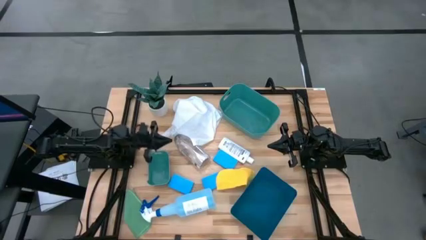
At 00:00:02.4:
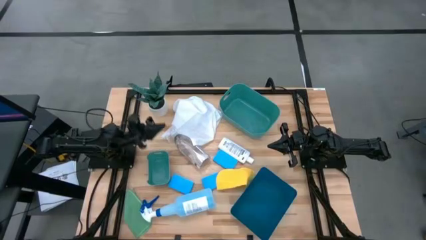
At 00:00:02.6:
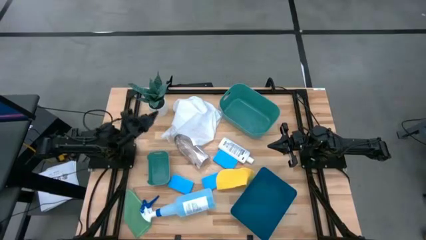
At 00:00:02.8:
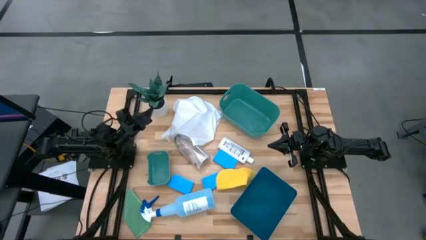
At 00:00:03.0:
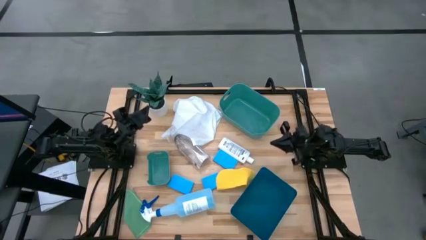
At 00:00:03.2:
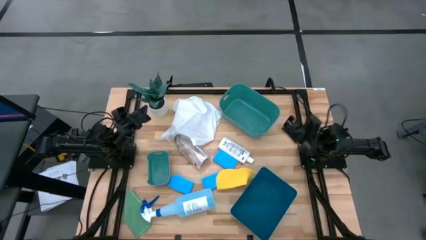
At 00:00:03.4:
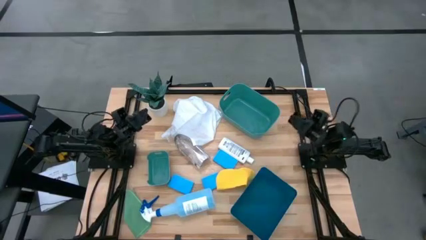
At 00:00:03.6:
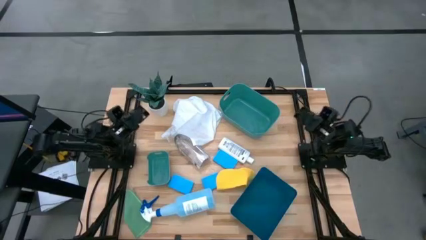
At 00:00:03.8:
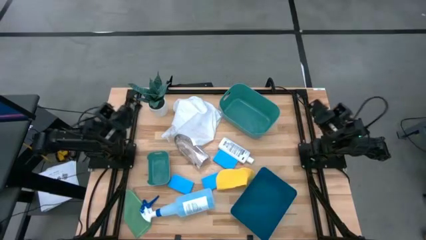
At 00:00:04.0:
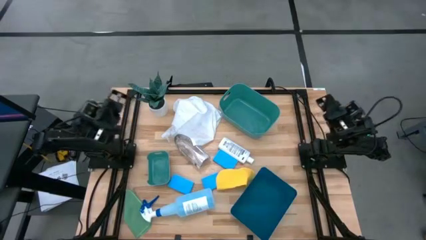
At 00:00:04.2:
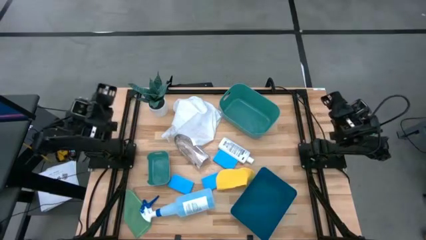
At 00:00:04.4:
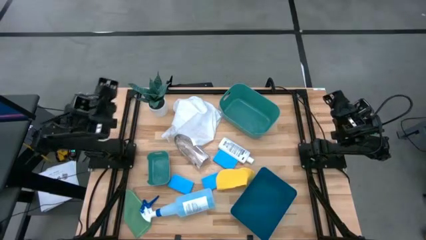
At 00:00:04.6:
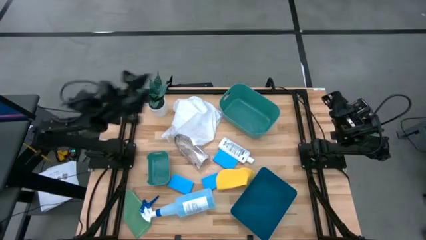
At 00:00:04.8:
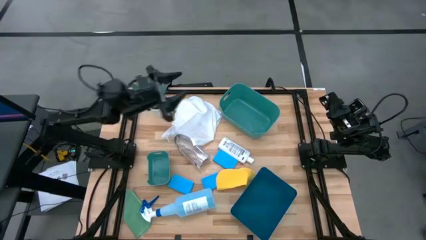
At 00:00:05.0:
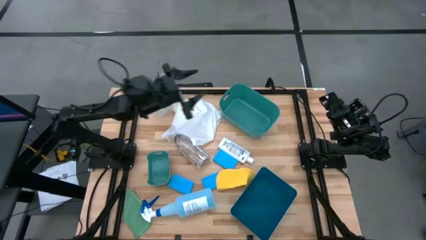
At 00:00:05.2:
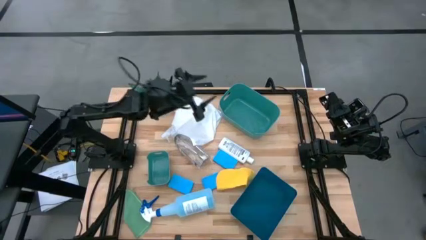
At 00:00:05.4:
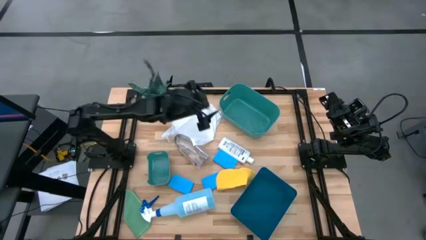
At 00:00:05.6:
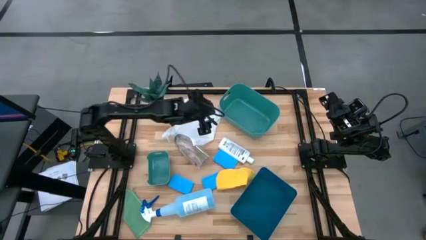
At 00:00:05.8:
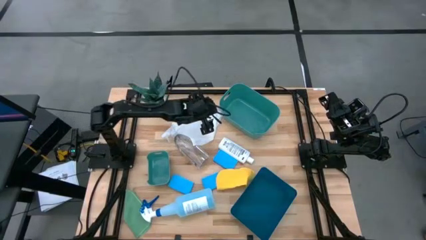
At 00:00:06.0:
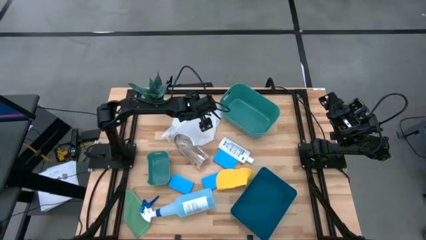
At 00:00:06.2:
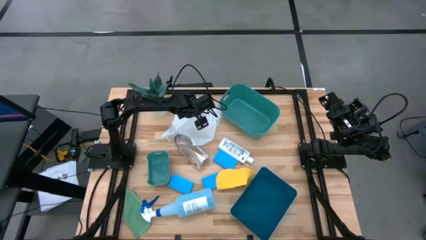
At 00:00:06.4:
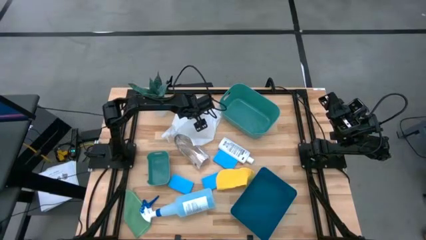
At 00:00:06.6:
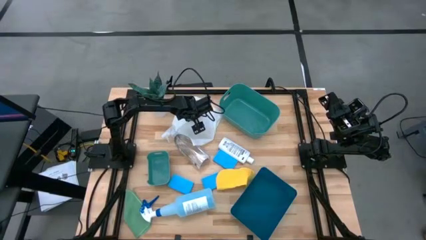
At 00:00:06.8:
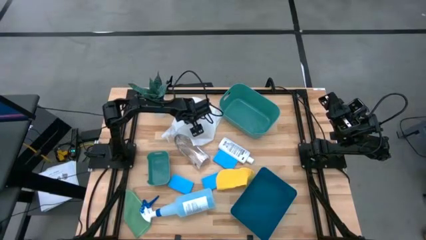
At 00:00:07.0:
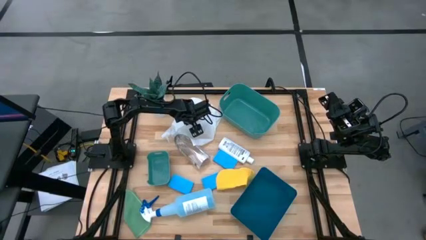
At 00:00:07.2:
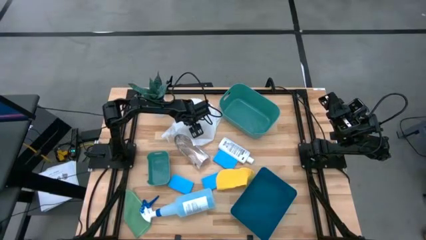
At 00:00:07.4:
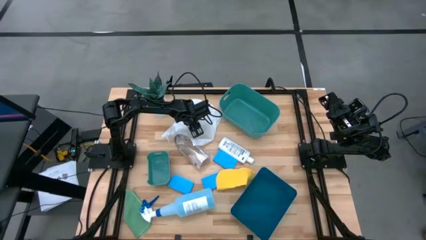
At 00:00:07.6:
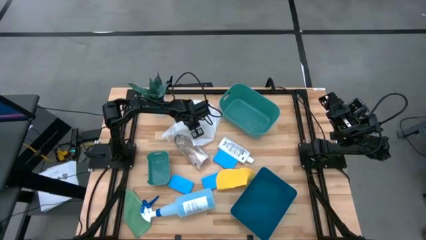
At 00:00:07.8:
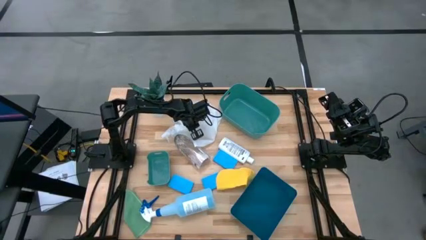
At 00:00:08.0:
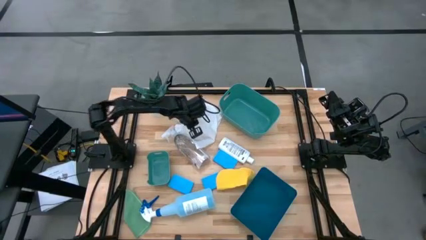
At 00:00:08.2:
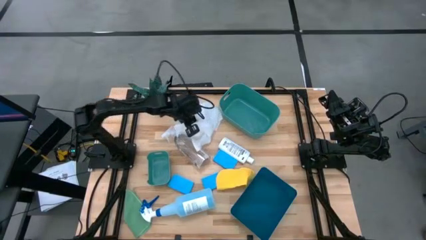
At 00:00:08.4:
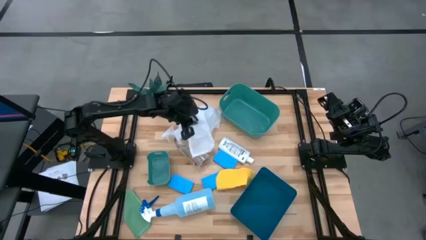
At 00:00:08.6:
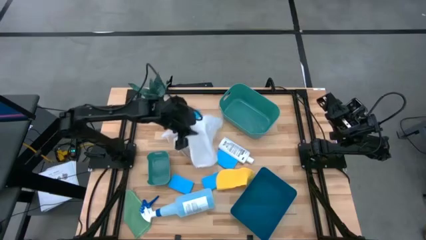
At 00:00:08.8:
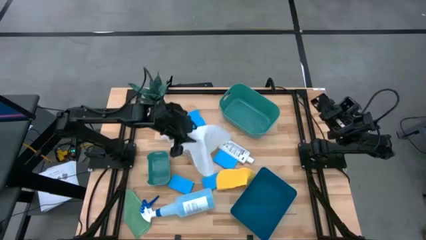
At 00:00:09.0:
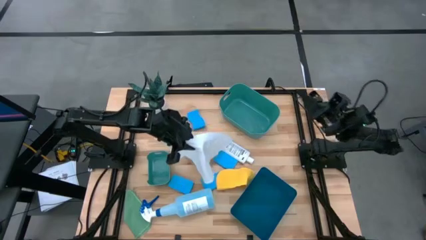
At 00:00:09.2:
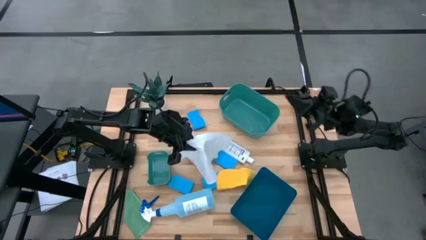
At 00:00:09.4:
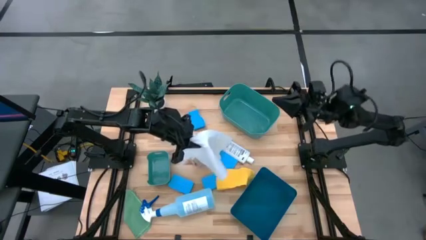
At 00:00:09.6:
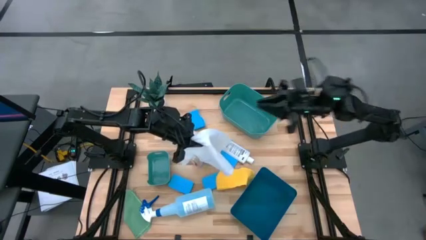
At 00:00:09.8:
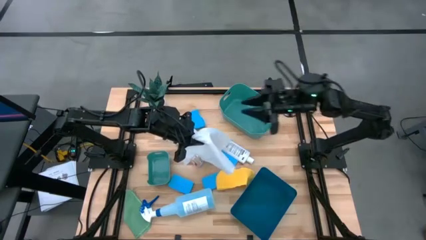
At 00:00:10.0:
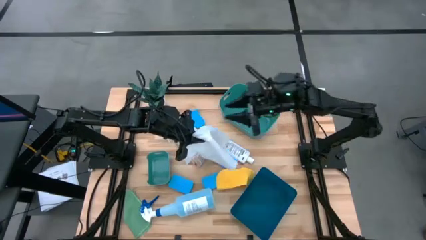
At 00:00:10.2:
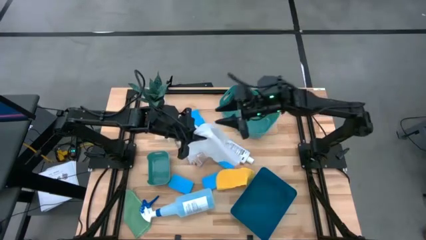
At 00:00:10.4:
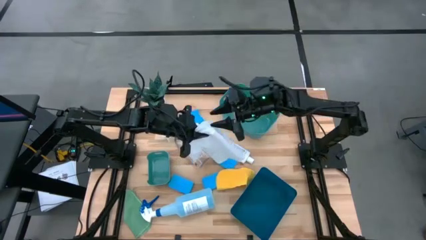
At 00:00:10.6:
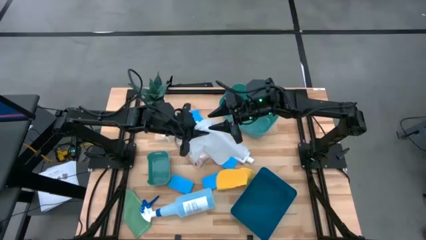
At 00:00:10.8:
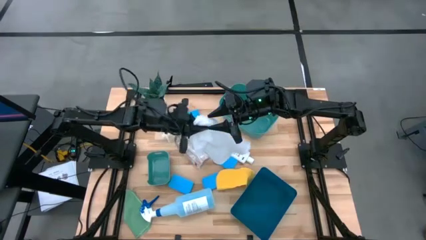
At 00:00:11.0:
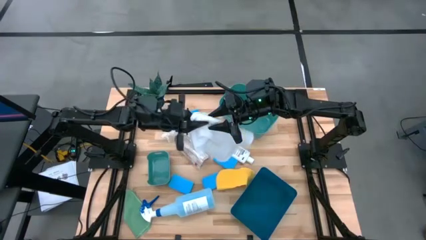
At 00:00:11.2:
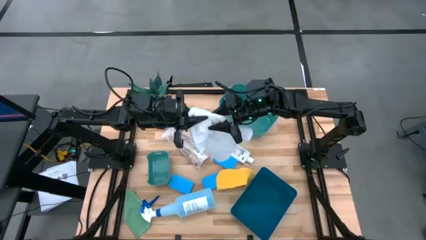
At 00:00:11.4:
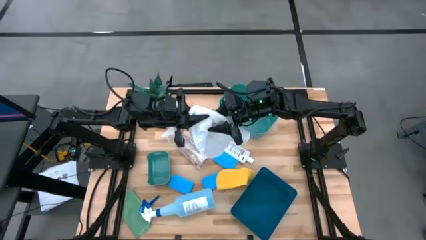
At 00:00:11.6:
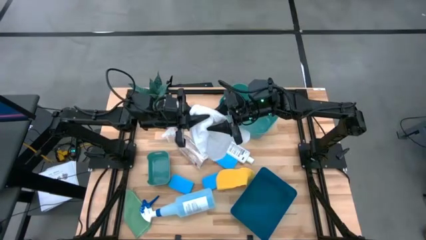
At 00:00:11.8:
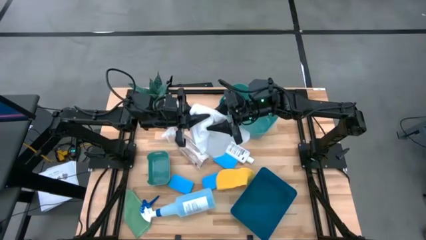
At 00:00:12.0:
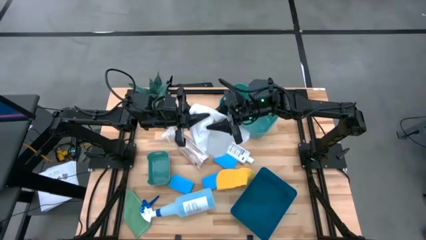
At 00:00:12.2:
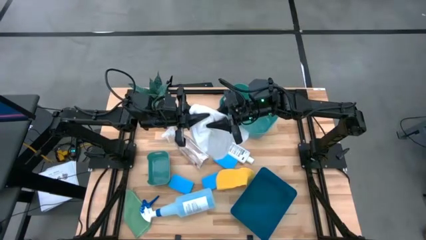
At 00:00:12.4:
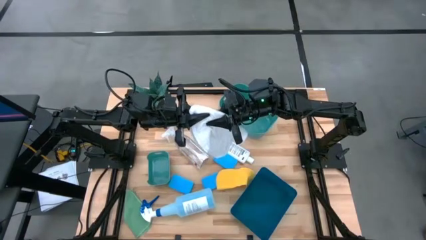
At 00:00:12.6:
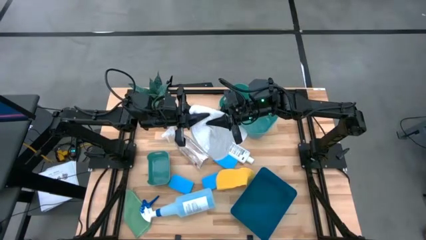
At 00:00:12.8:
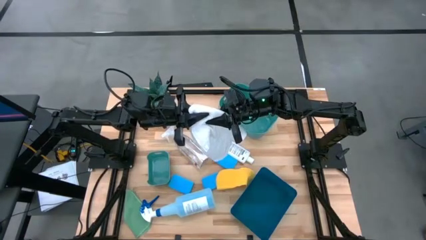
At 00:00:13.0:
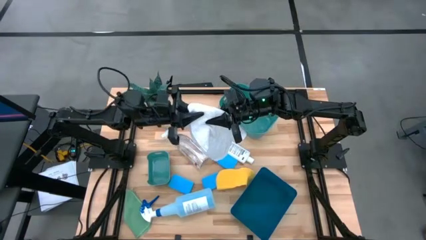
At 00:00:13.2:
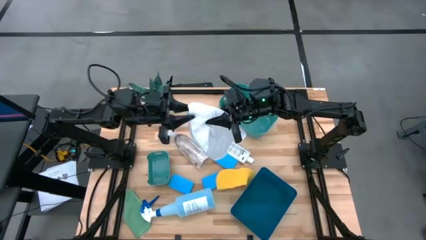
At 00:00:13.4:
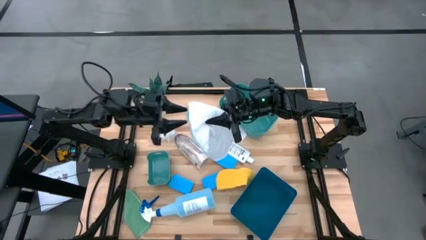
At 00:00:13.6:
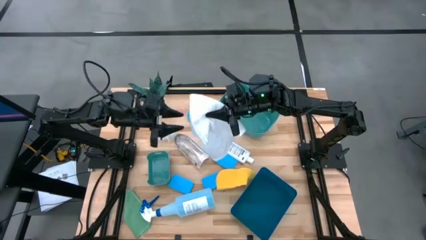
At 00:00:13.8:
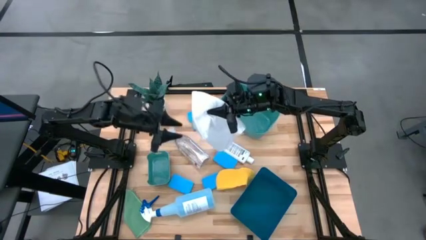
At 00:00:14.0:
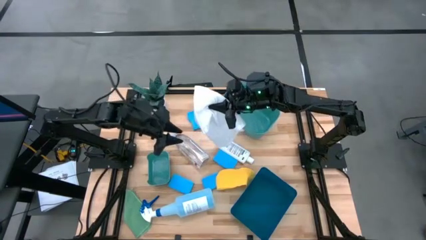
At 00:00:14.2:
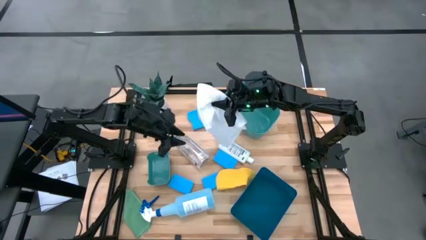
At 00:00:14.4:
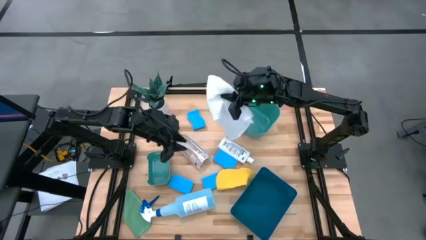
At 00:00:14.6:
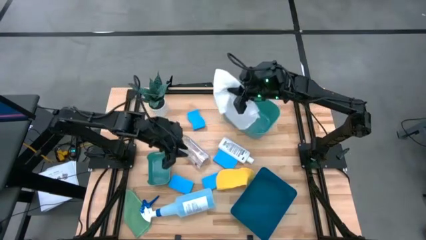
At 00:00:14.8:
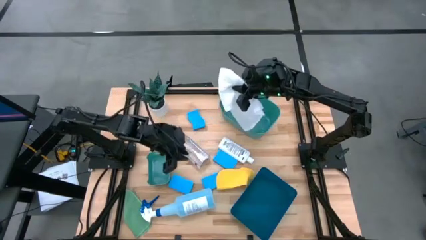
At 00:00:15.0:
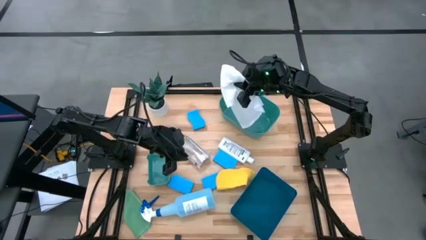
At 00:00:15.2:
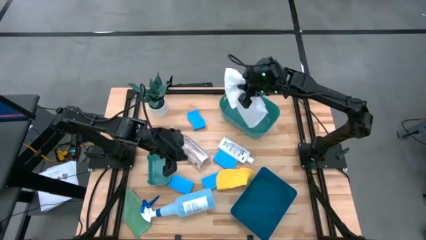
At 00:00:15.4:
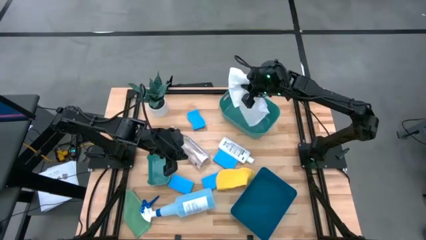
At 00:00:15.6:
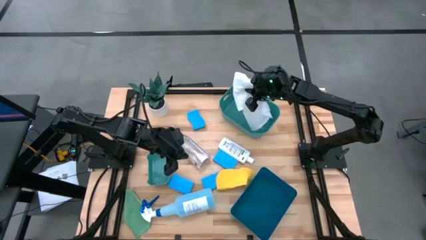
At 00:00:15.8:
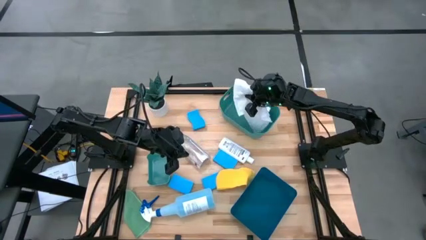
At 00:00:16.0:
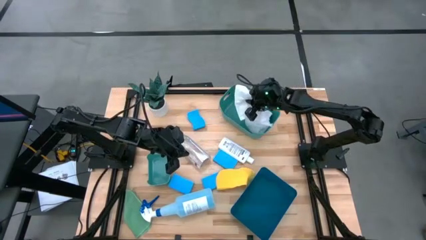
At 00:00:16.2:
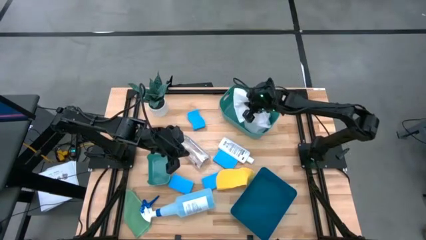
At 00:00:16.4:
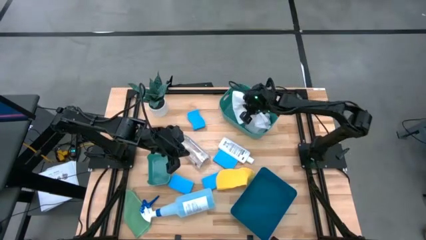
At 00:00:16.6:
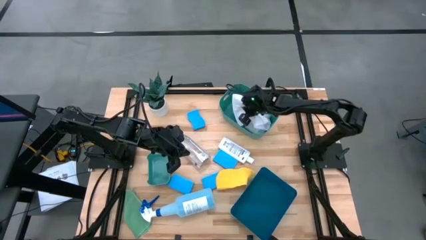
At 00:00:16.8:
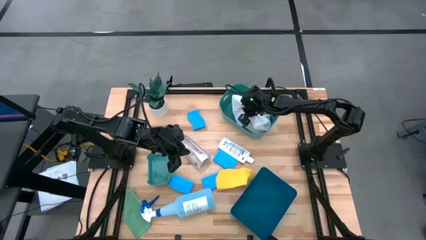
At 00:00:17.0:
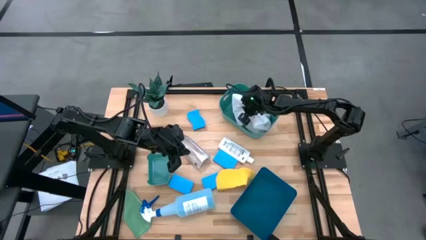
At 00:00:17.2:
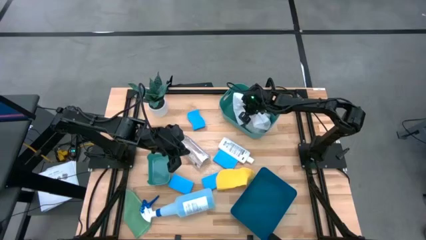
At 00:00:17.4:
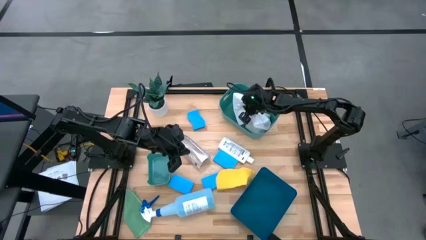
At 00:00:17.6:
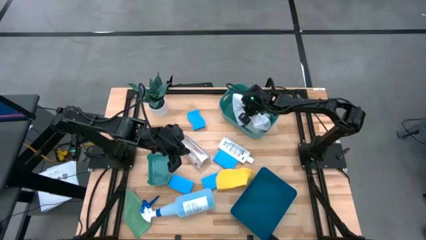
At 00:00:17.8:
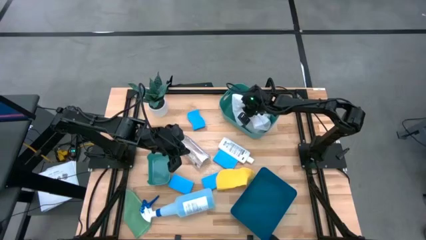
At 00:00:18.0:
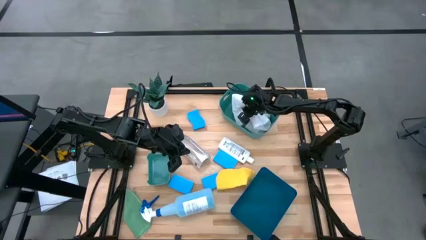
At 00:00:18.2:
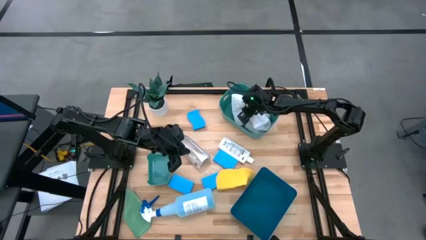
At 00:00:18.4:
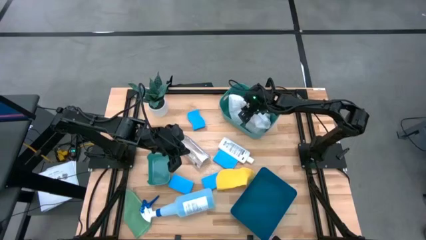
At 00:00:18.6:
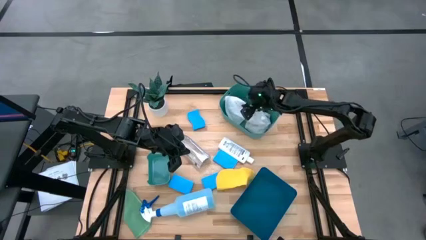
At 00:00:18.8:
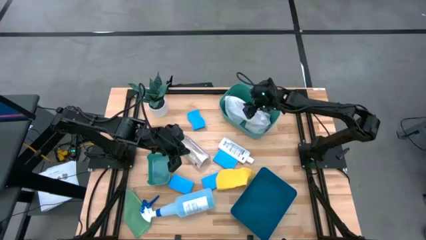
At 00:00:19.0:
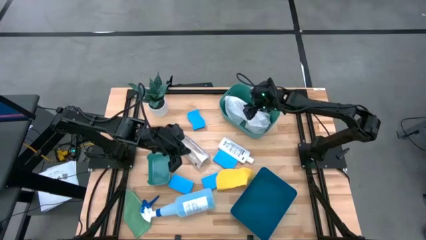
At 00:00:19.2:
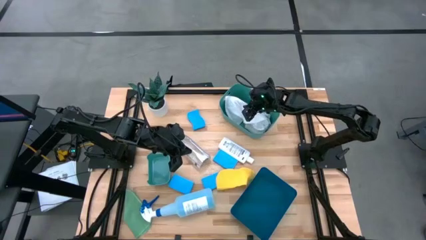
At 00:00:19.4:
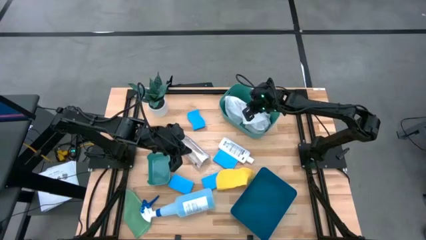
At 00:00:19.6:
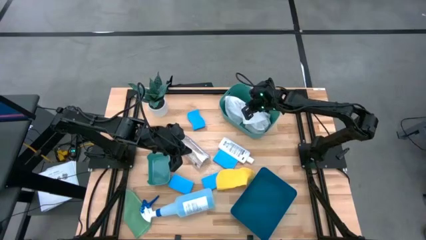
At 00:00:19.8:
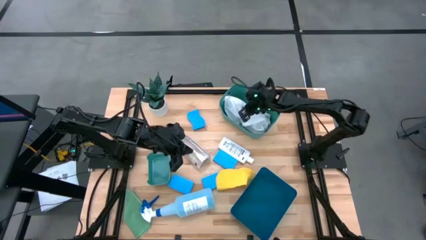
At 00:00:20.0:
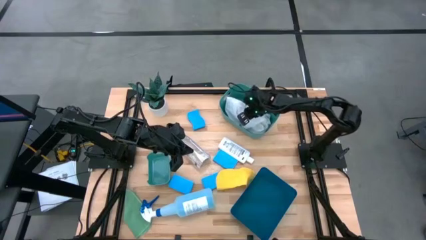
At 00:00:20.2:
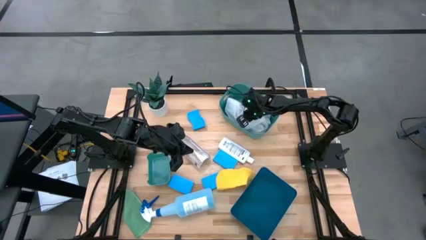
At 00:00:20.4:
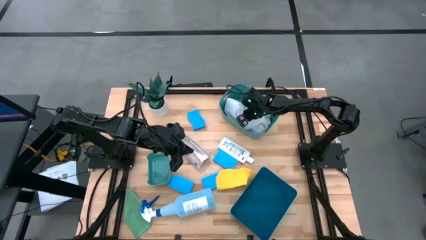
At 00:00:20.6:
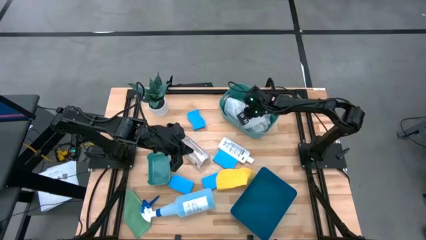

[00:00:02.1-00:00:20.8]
Task: Pick & Place Kitchen Items
Put the white towel into the big green bin
